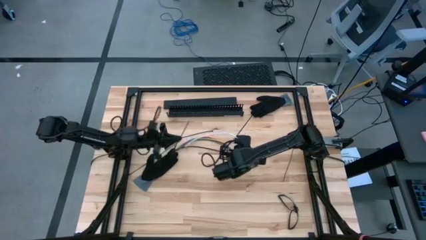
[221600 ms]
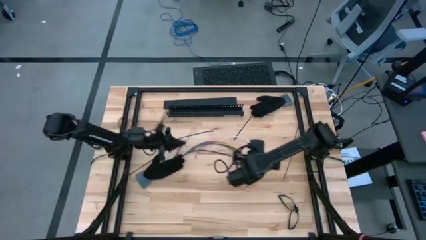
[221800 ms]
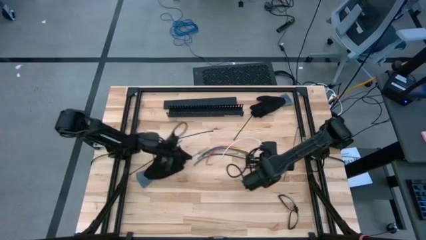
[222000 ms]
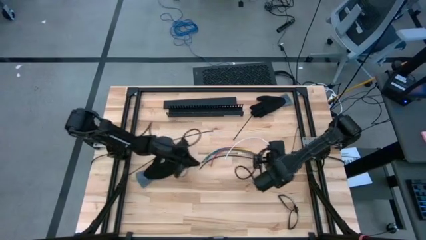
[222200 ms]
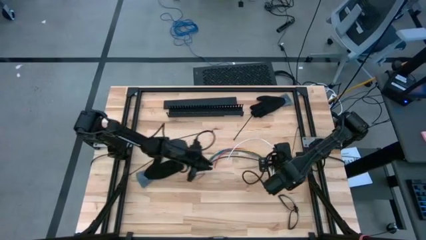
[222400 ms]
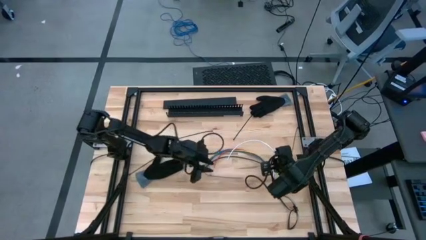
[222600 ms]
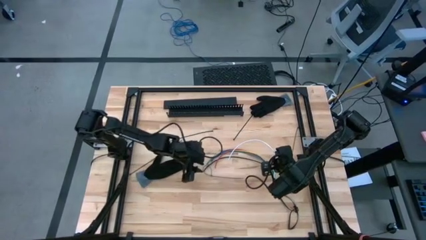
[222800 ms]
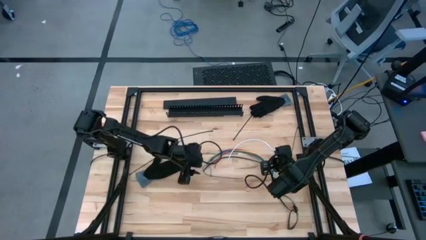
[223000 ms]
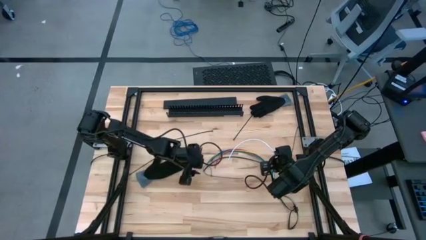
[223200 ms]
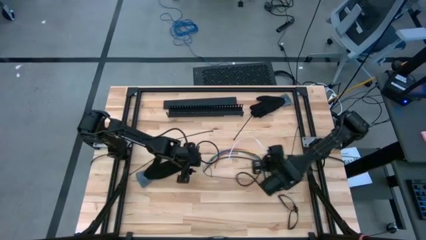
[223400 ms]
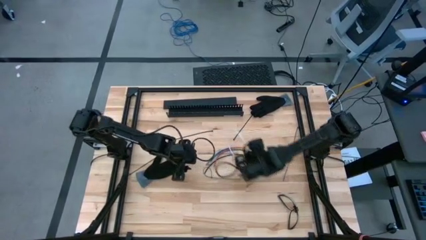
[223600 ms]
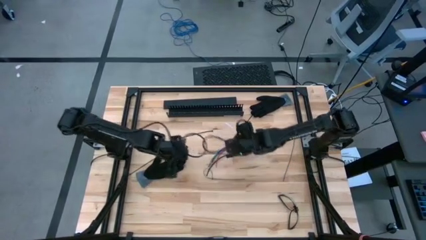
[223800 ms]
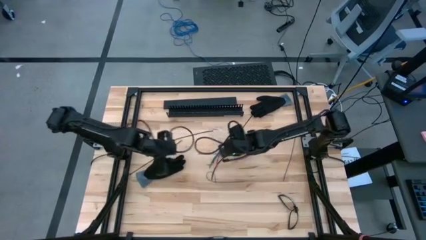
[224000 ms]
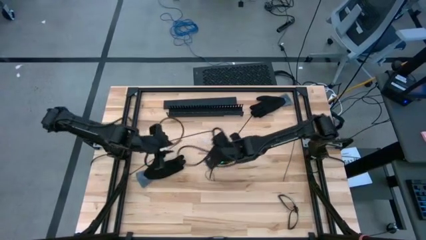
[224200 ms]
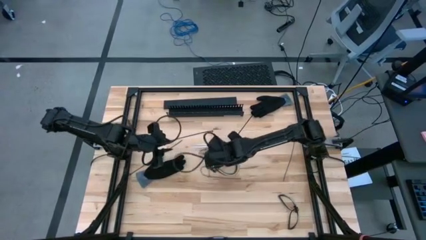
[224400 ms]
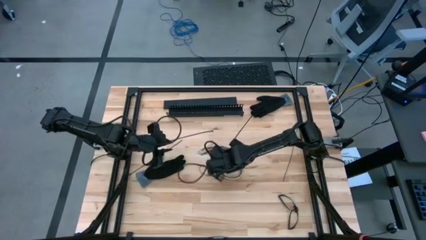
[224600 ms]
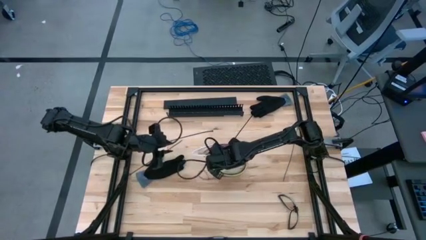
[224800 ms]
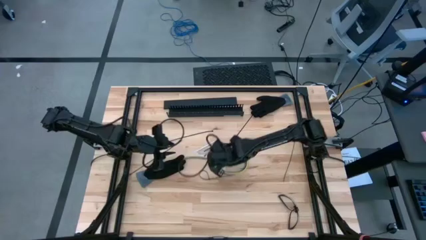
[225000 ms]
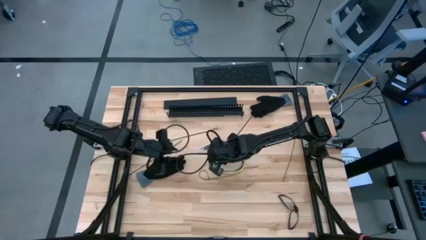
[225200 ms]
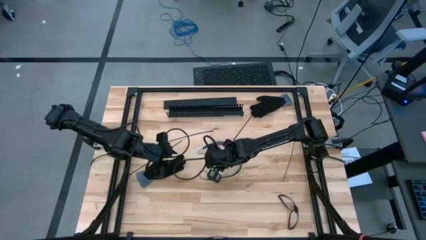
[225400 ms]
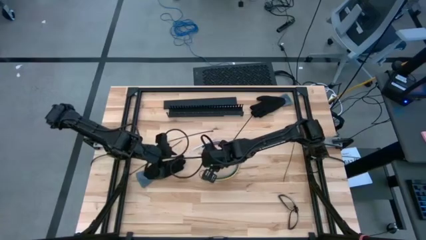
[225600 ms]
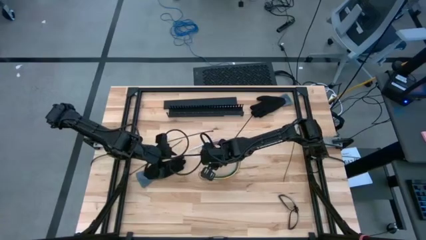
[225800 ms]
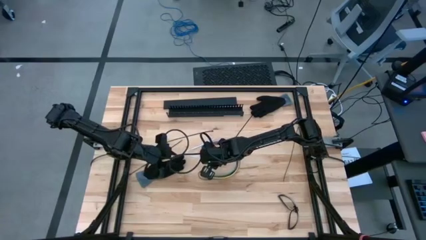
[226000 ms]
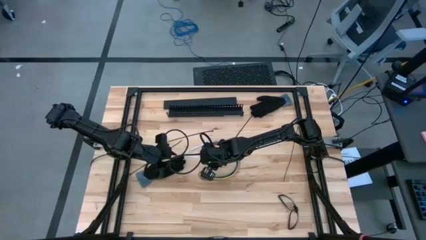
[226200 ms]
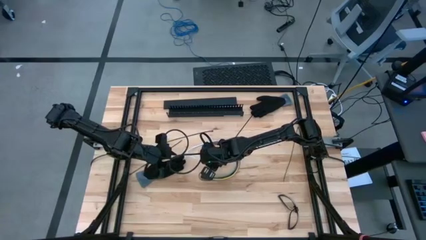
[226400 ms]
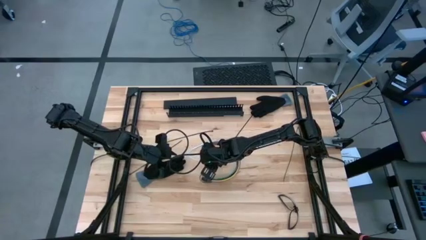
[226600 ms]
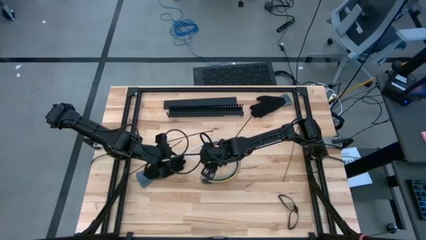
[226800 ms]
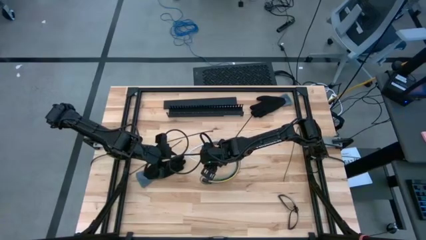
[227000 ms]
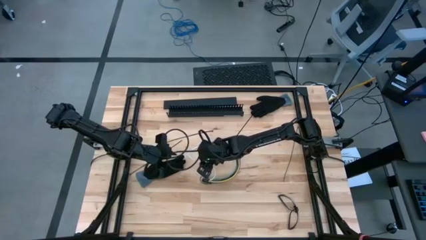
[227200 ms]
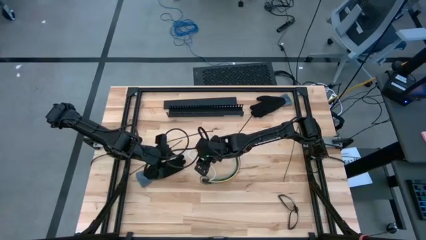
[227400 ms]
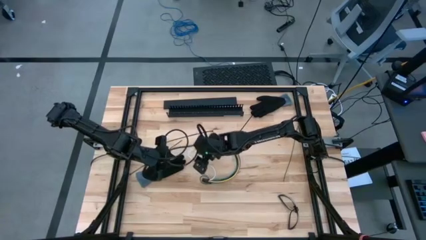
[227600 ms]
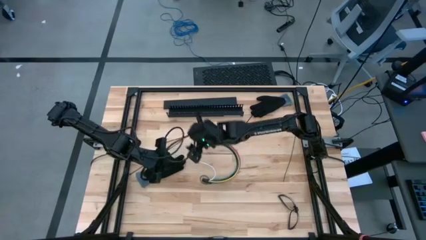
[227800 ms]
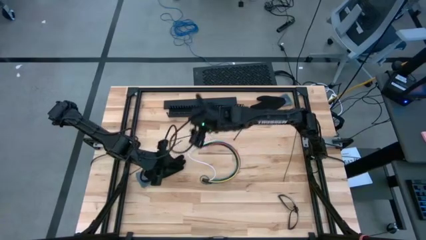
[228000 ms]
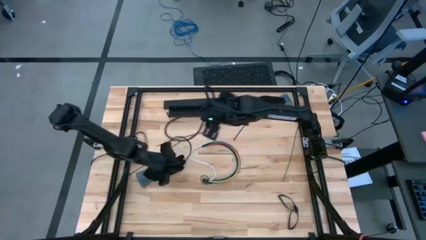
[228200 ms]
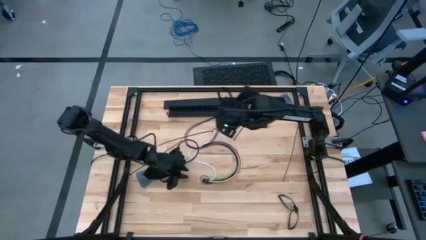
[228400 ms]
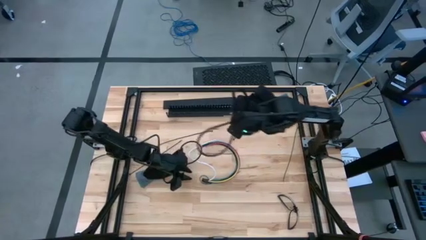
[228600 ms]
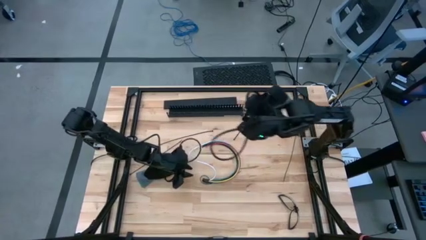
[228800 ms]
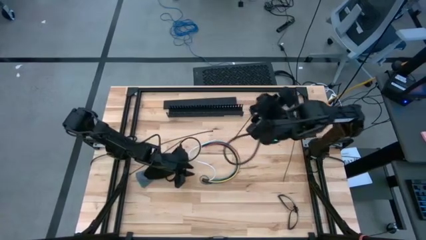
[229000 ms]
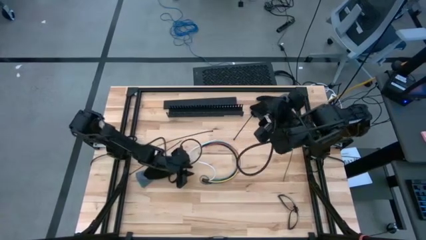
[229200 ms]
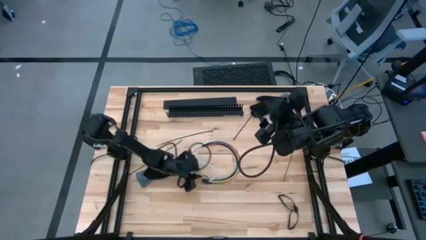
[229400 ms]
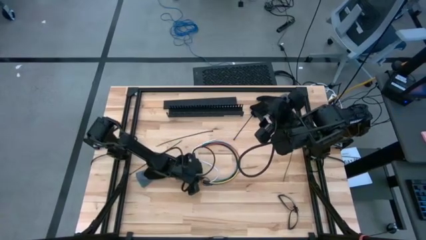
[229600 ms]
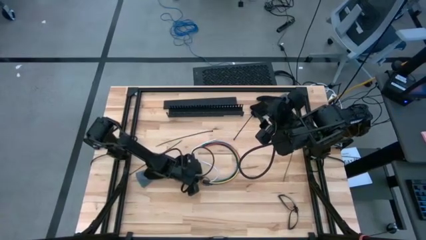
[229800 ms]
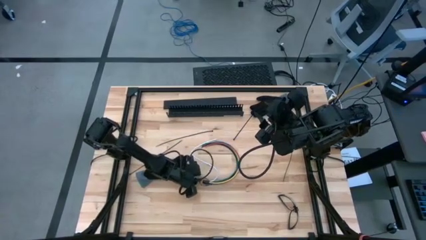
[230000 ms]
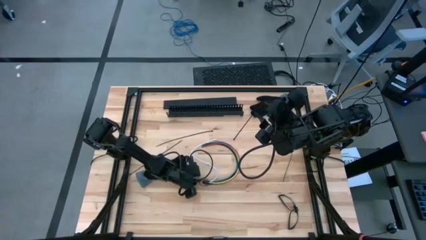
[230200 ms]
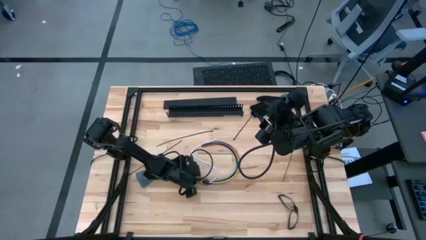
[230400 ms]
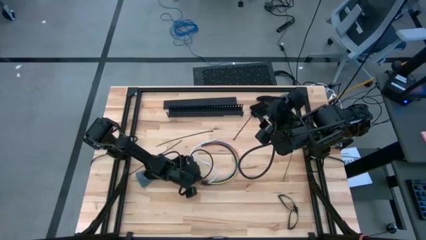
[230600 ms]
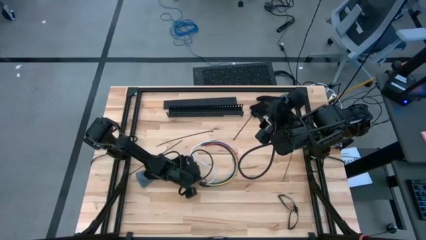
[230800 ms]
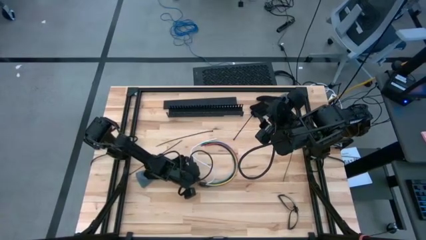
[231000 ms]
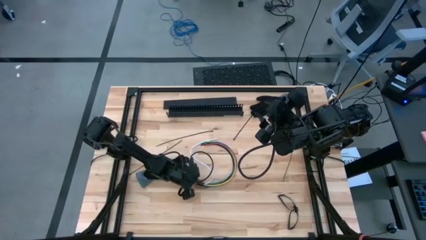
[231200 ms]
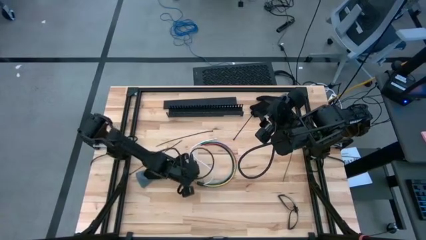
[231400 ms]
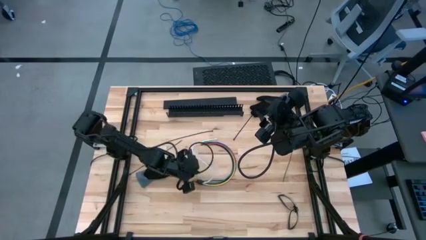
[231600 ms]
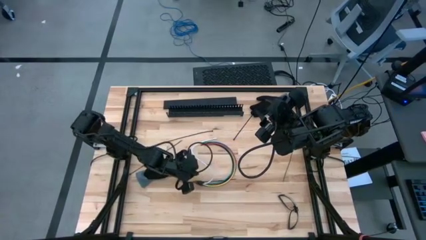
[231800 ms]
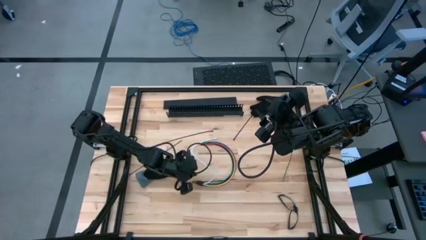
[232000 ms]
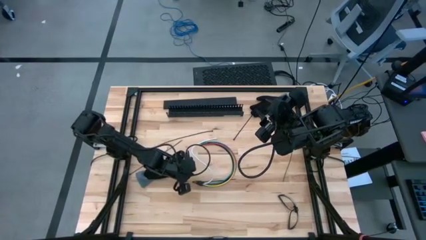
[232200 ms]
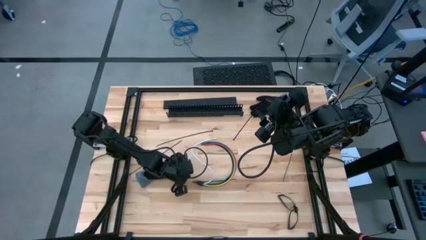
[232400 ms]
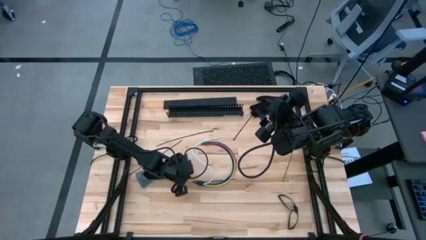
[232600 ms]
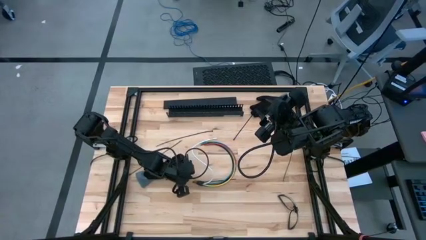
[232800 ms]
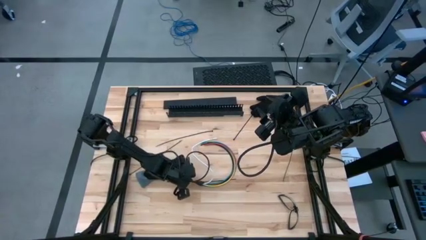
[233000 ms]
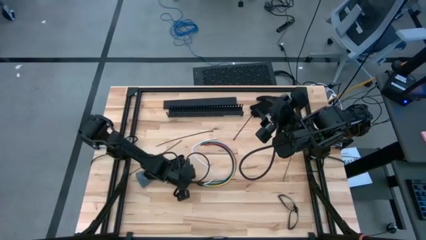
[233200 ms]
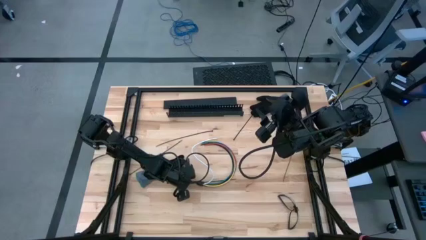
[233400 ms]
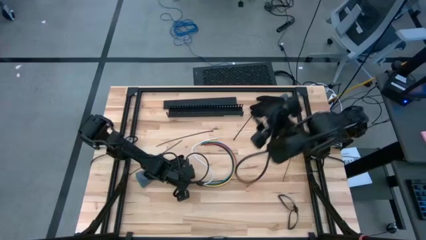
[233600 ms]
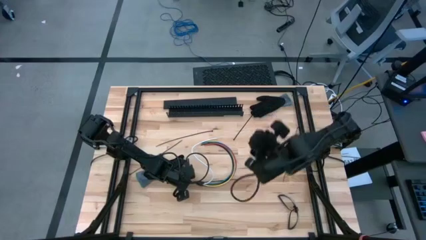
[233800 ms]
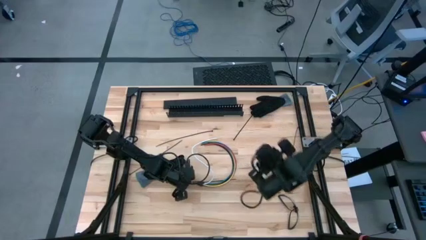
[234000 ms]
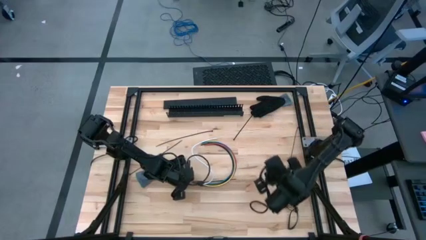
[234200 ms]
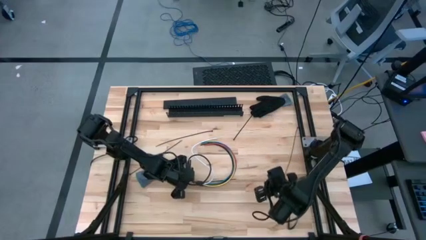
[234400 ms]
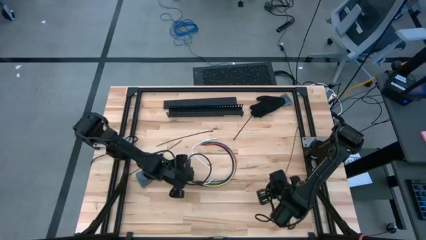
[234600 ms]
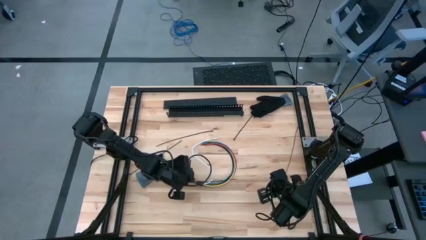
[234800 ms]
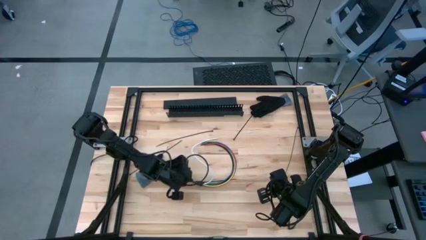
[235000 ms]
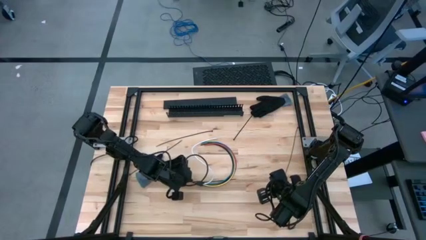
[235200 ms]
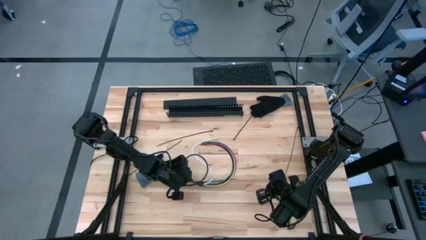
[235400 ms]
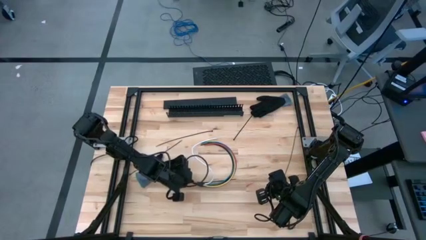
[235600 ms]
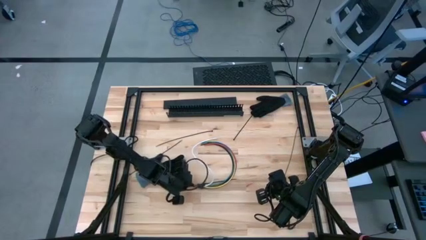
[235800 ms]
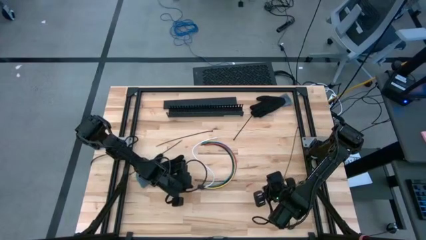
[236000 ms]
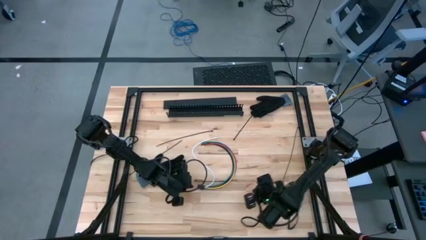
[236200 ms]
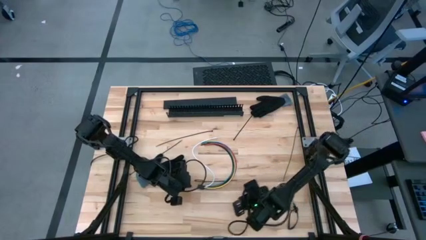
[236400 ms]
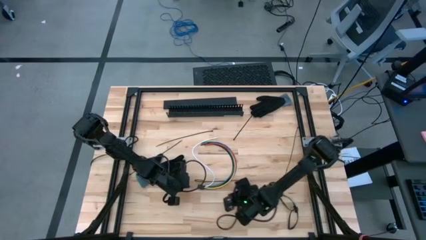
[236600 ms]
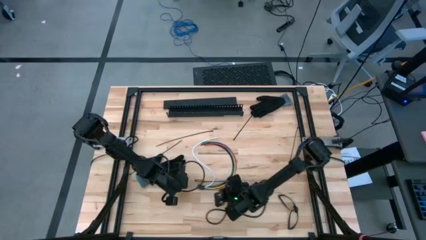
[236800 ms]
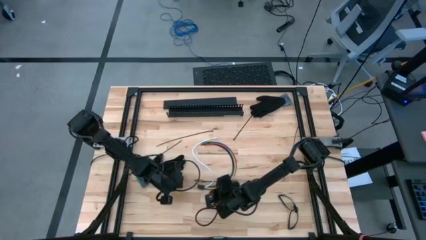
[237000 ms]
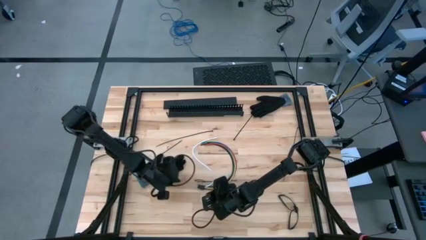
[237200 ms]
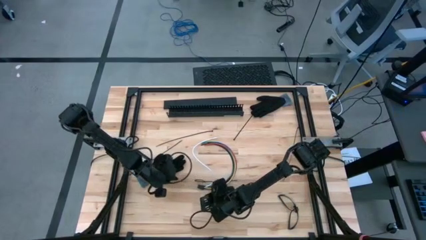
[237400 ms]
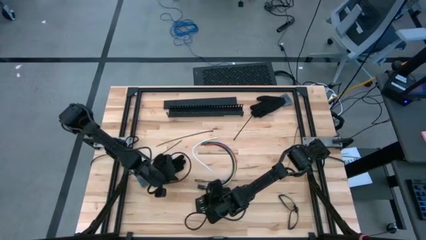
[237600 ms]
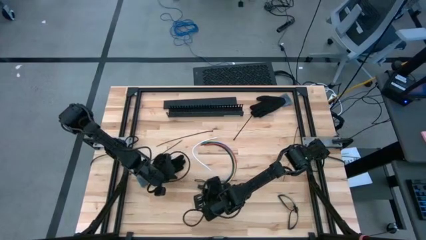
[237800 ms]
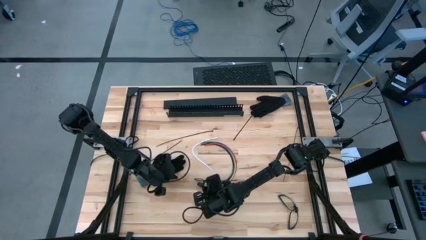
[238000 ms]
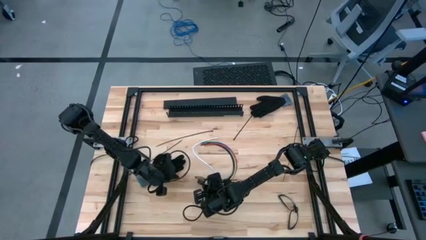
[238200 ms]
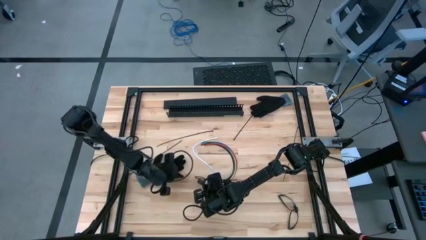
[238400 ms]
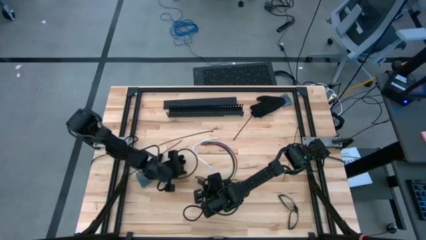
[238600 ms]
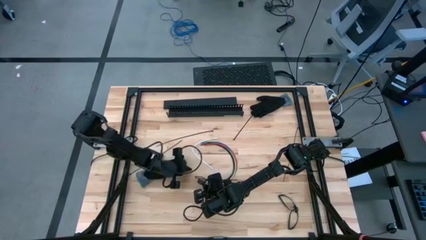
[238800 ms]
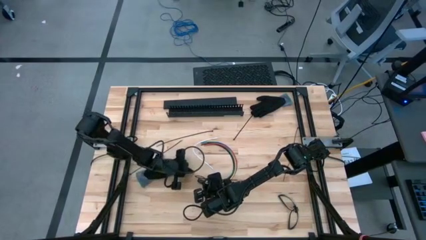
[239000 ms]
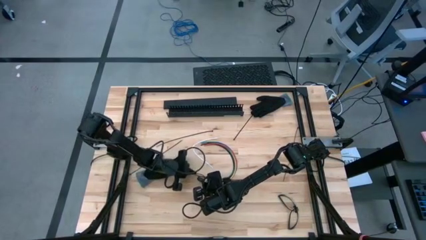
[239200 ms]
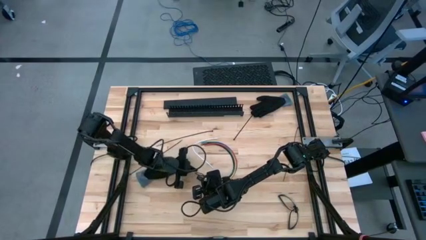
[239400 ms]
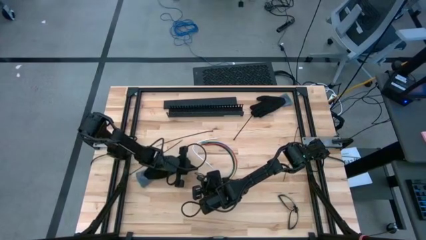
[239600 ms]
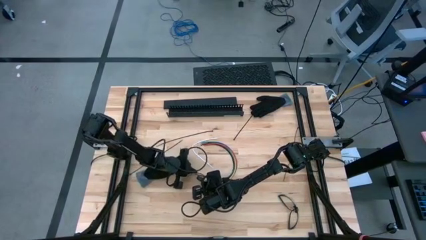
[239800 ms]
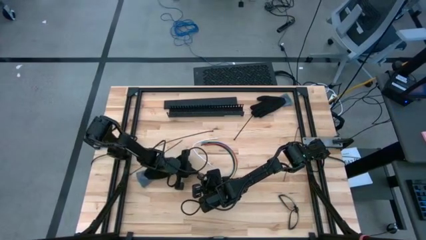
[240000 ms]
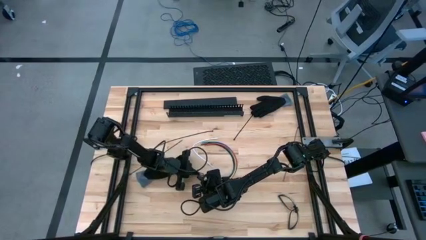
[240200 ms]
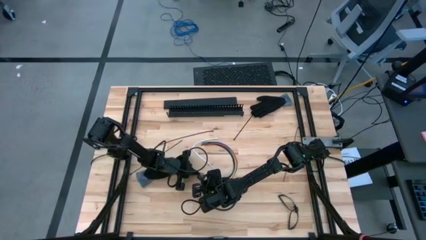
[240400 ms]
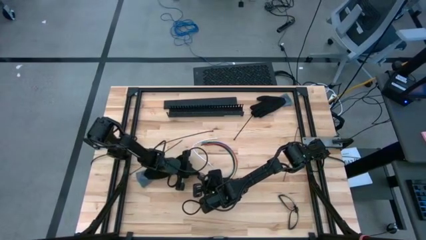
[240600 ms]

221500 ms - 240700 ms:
Task: Ziptie cables
Wrap the cable wires using a zip tie
